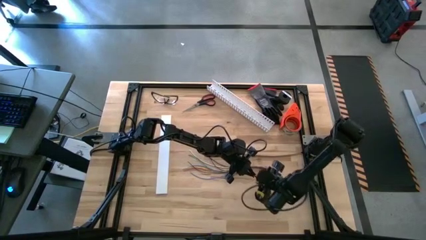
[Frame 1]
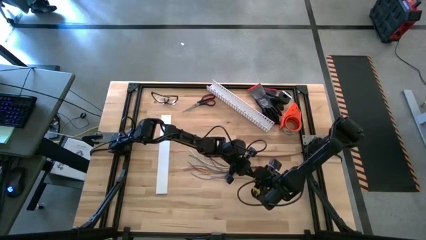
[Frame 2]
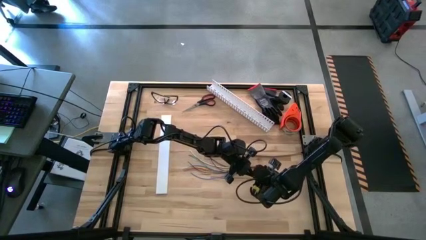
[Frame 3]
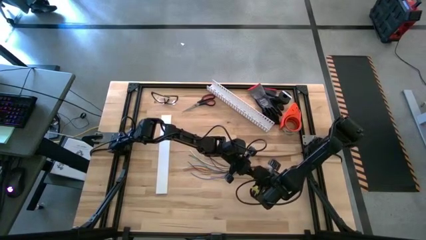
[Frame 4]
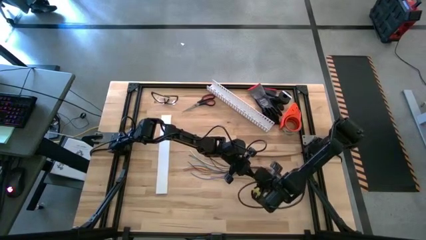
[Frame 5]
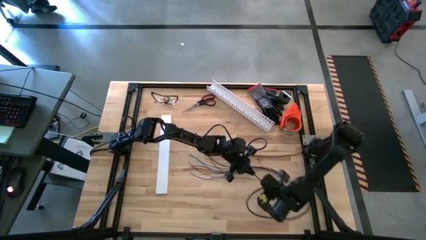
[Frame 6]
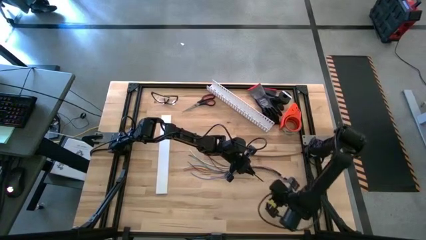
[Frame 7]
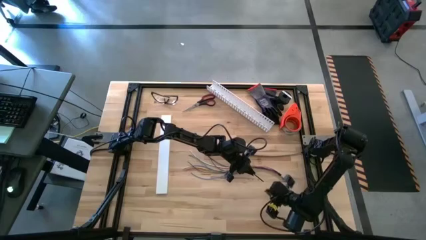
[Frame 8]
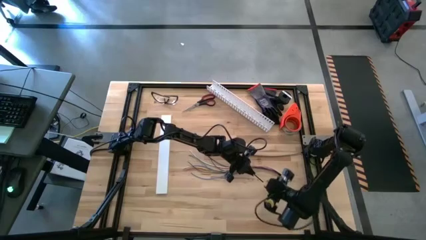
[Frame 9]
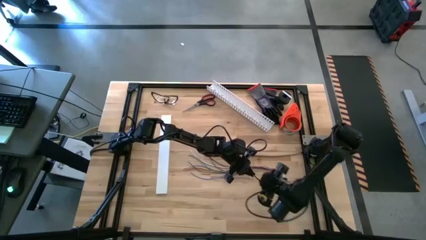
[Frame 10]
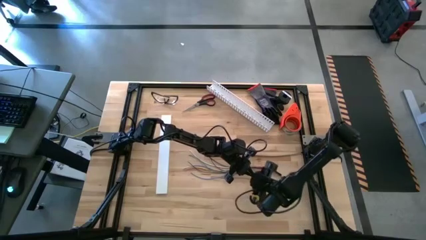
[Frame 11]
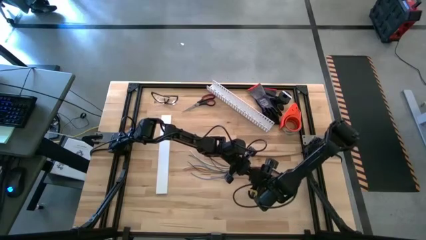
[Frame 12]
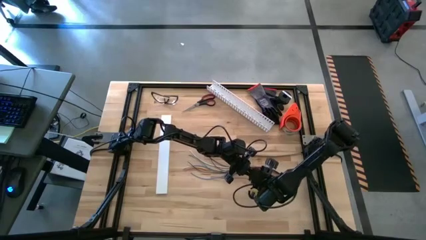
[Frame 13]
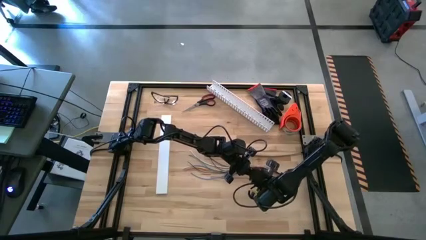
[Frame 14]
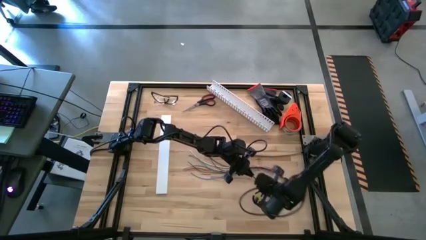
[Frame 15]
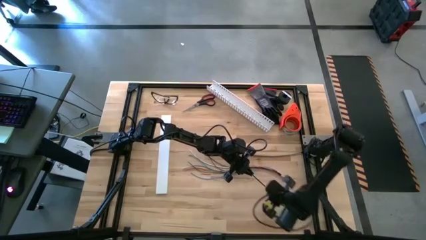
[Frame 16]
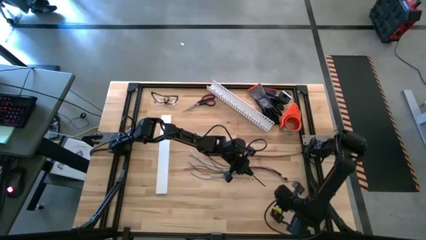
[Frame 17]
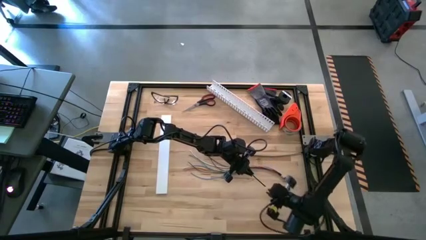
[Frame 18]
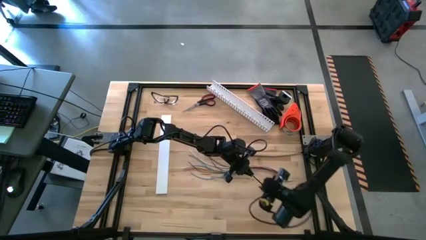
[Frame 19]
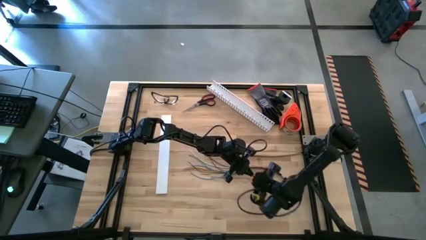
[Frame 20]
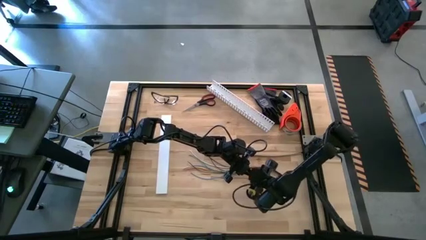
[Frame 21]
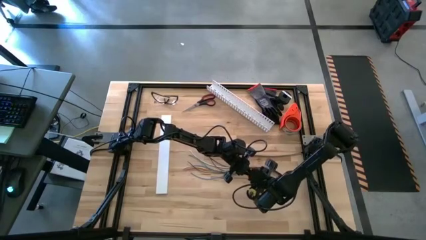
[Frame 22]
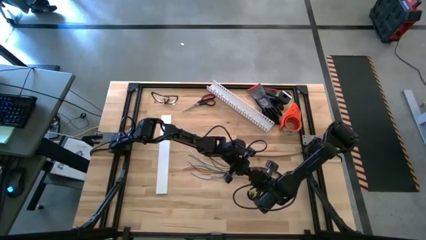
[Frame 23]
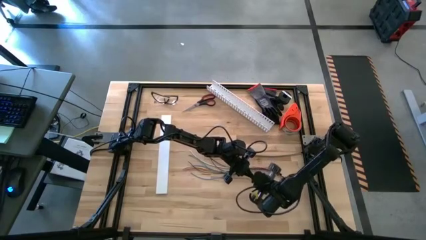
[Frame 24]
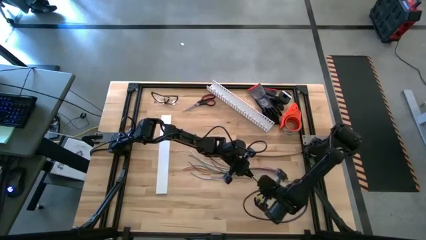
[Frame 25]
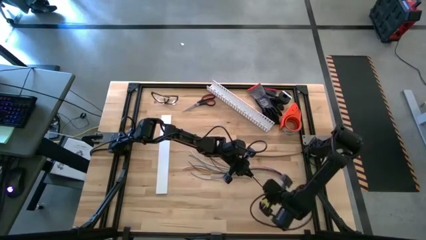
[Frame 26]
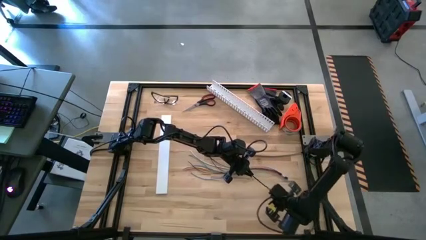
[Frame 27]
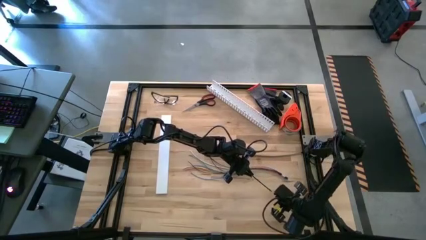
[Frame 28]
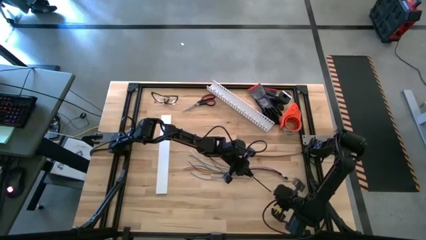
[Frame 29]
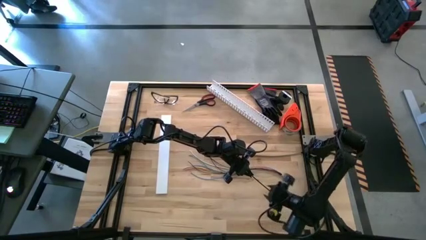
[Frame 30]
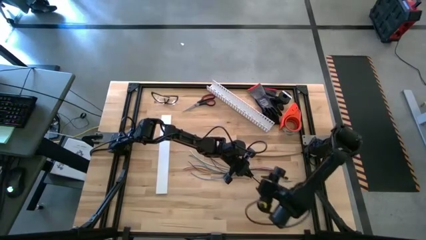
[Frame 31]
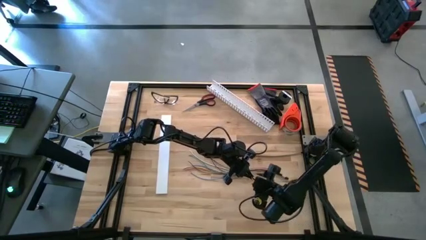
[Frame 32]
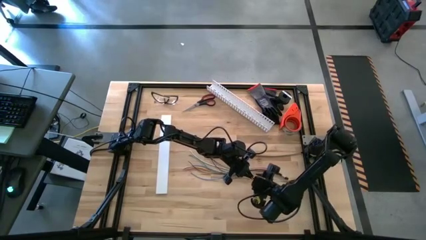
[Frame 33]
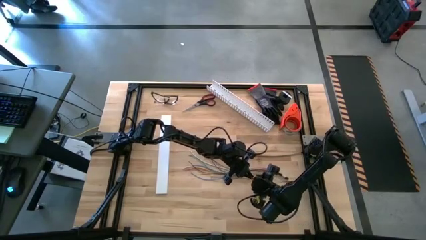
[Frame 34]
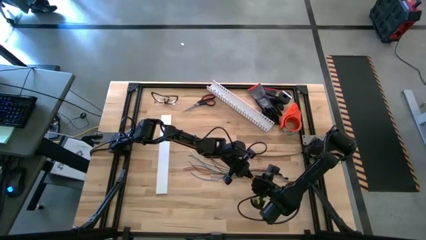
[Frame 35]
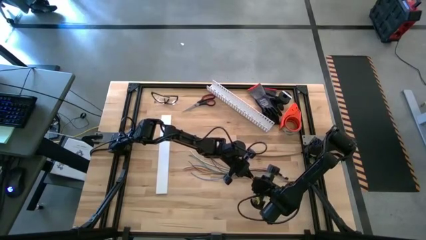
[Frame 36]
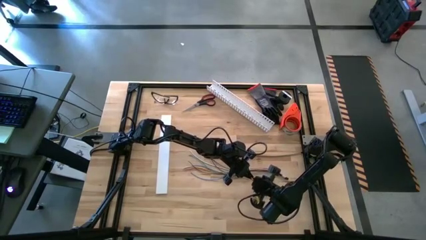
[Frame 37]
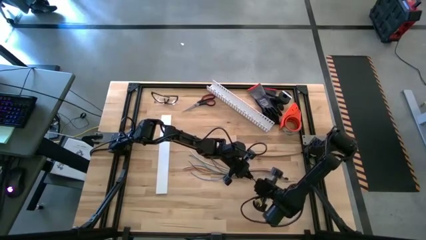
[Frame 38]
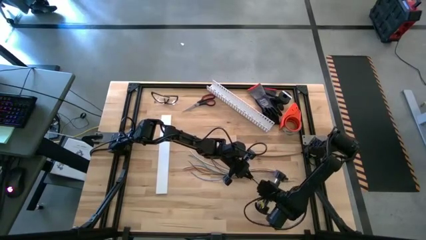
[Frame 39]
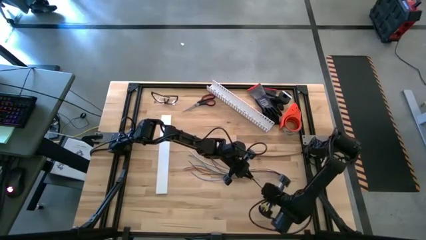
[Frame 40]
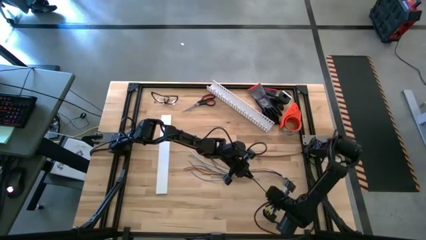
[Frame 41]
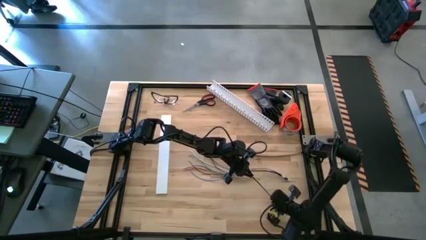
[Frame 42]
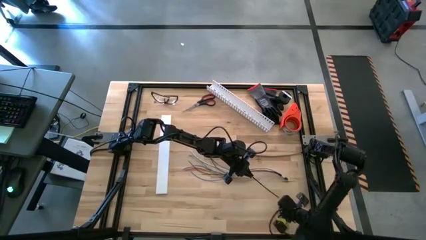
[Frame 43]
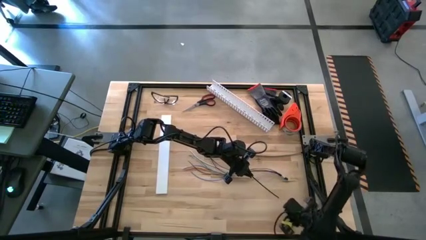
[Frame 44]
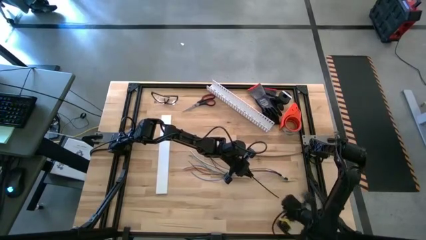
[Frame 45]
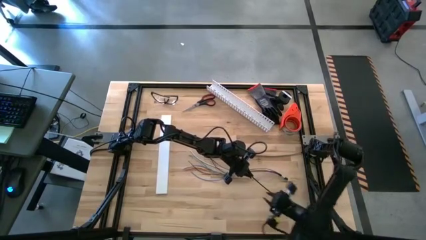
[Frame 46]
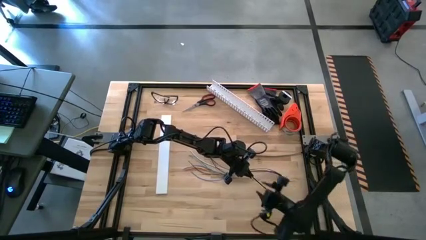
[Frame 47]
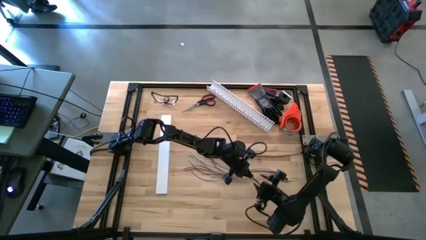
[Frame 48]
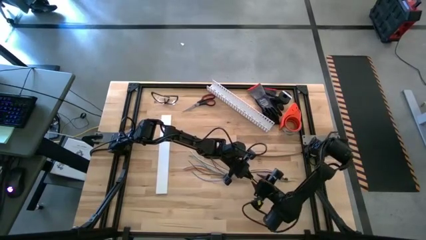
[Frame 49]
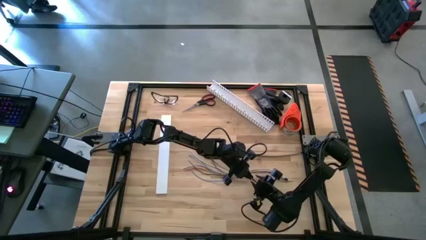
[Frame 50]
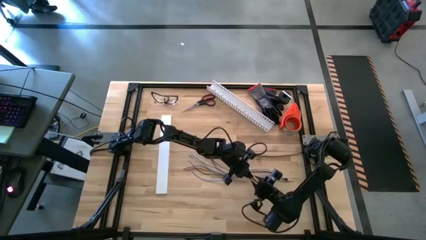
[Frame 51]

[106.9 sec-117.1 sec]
Task: Ziptie cables
Wrap the bottom black zip tie on the cable wires
